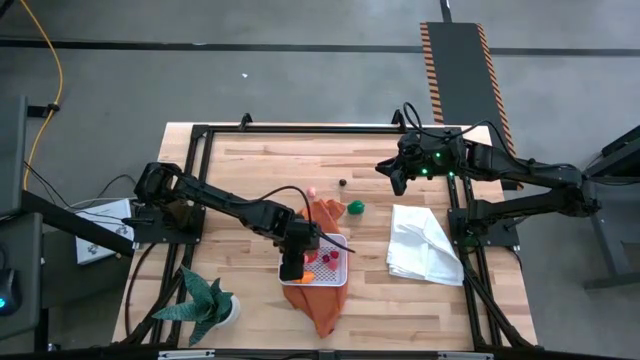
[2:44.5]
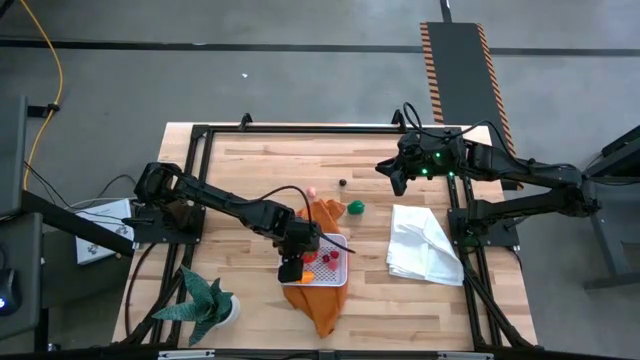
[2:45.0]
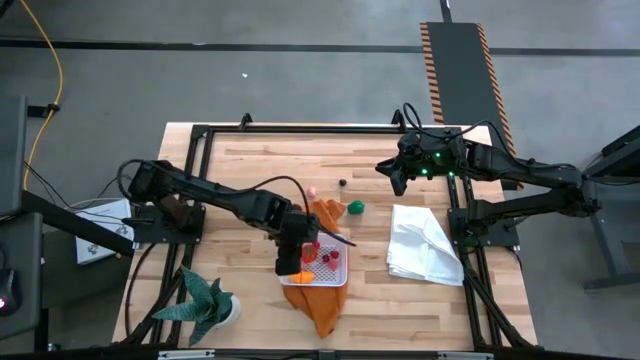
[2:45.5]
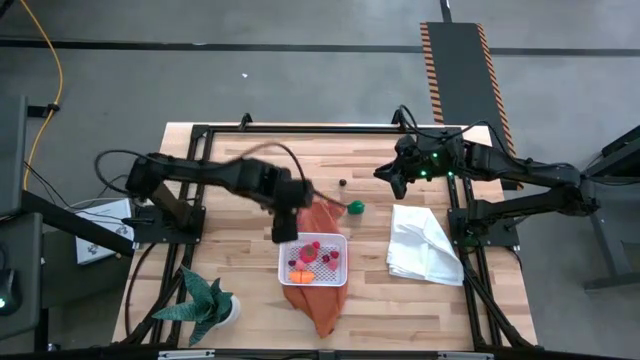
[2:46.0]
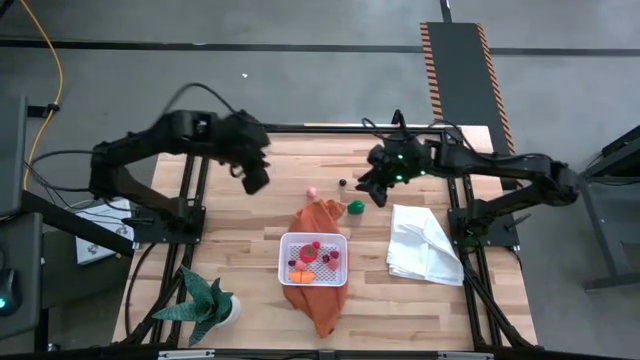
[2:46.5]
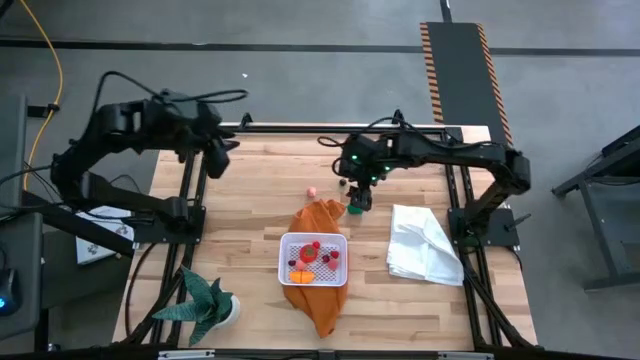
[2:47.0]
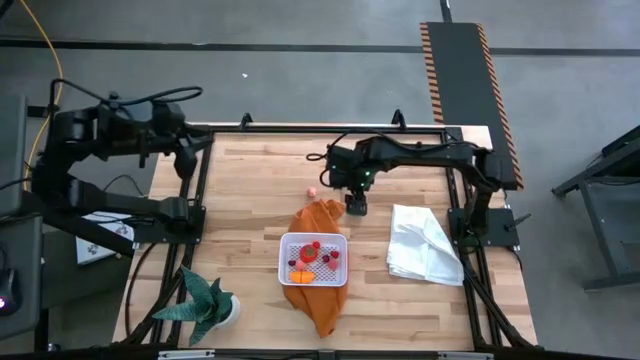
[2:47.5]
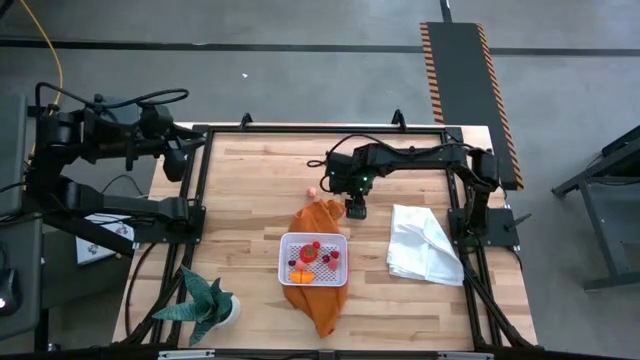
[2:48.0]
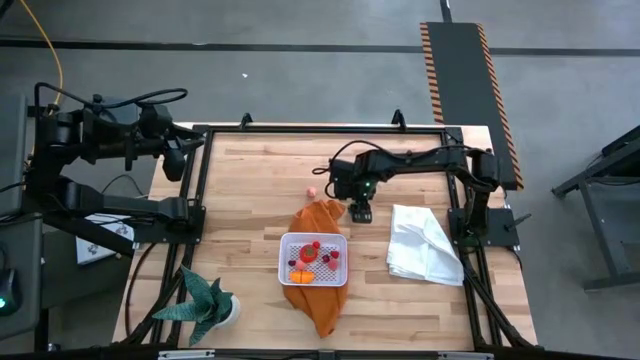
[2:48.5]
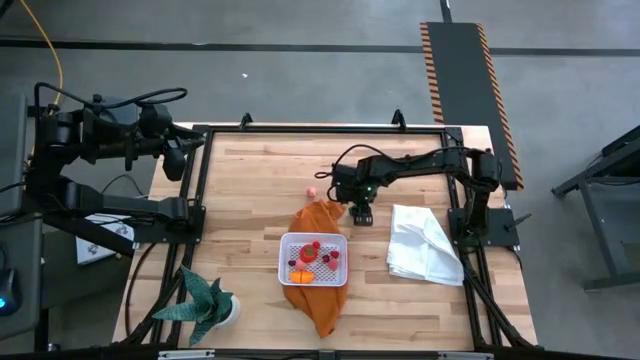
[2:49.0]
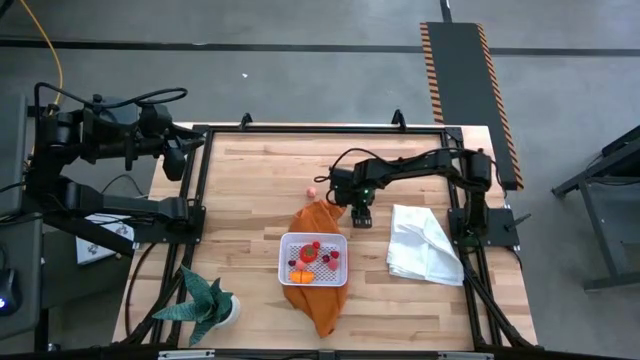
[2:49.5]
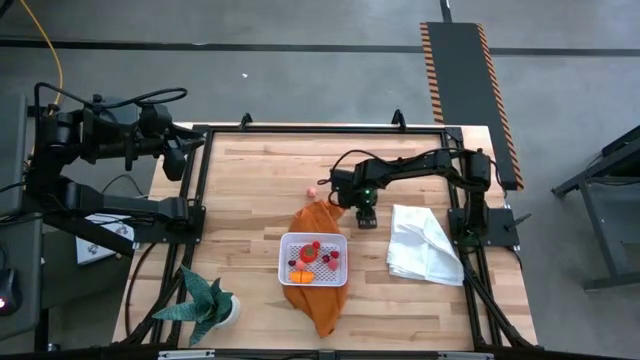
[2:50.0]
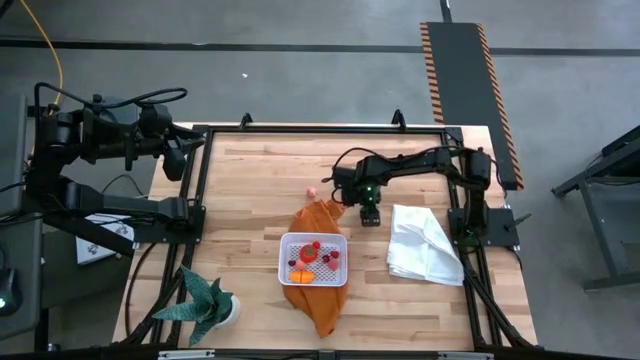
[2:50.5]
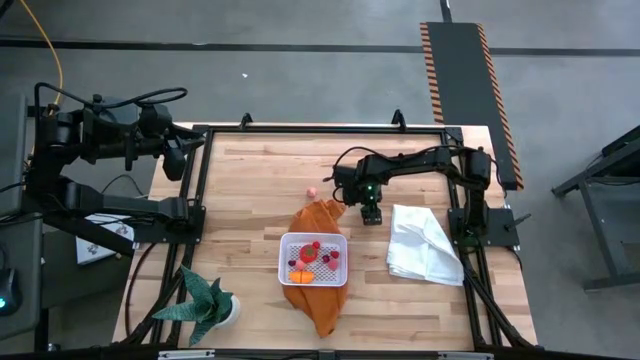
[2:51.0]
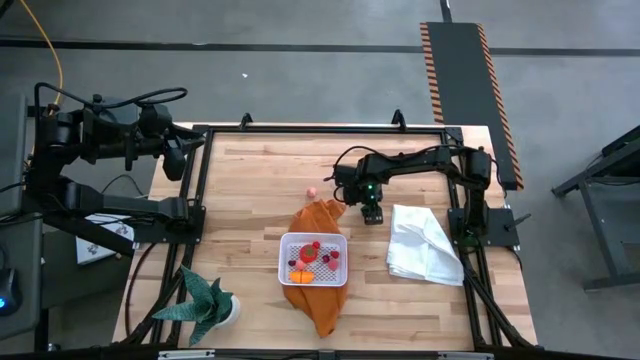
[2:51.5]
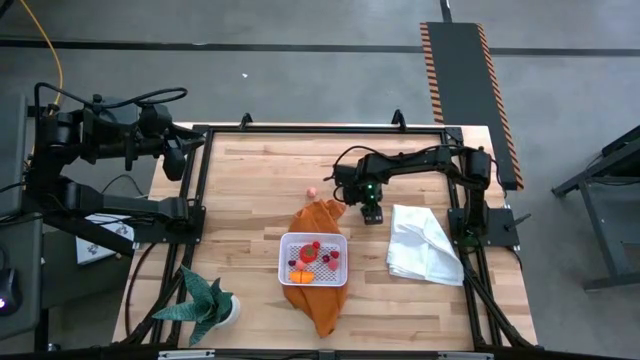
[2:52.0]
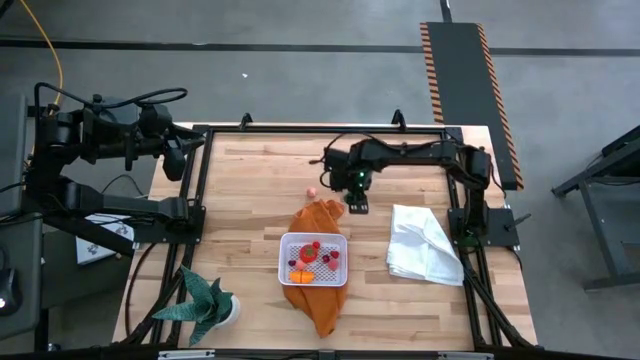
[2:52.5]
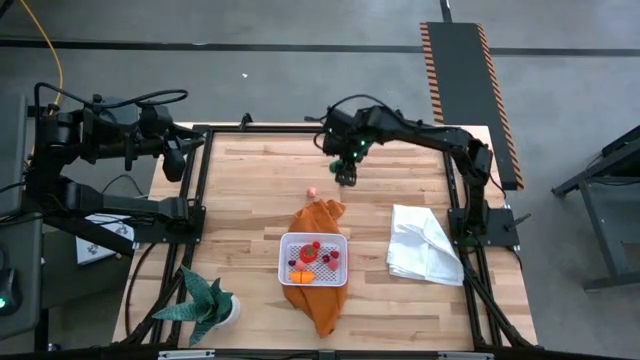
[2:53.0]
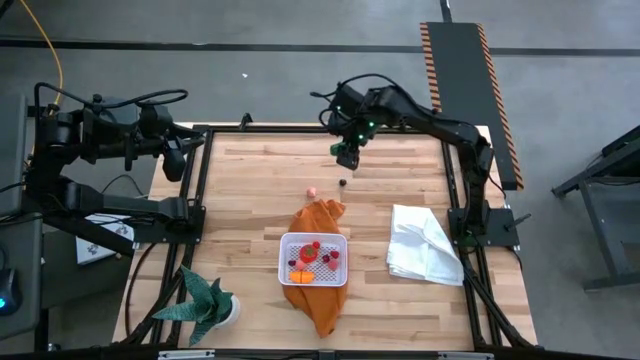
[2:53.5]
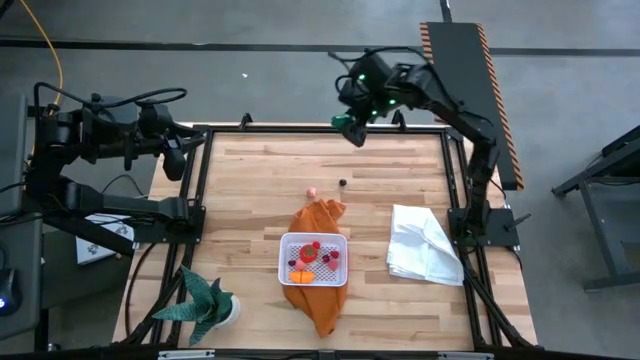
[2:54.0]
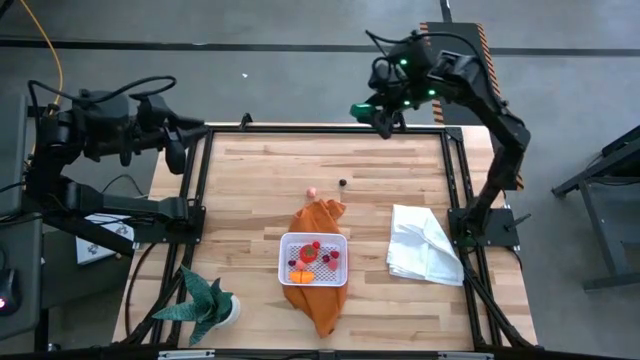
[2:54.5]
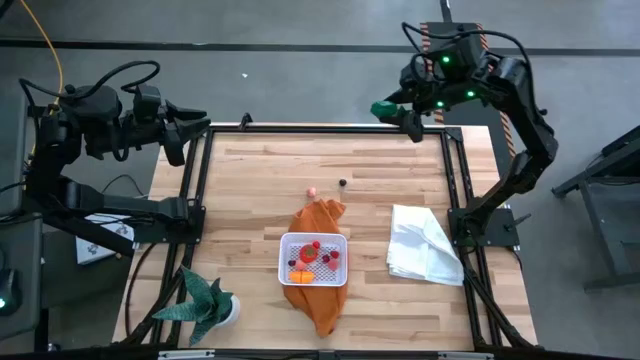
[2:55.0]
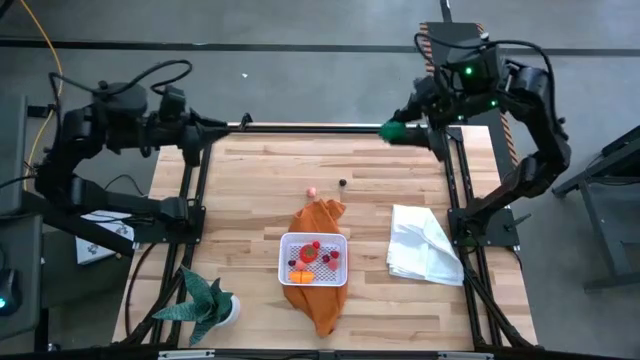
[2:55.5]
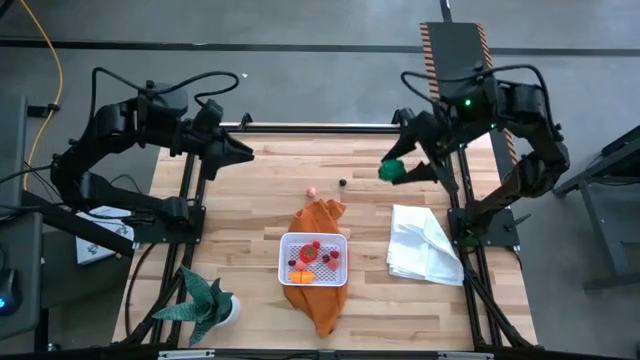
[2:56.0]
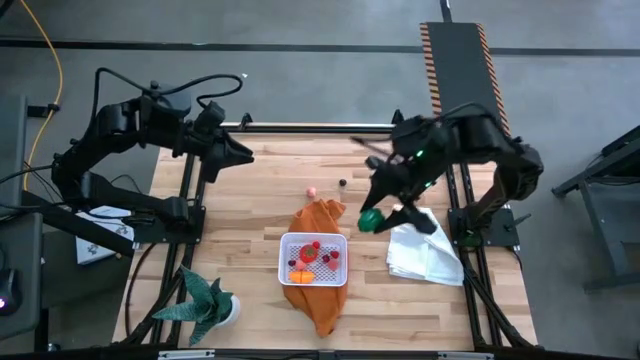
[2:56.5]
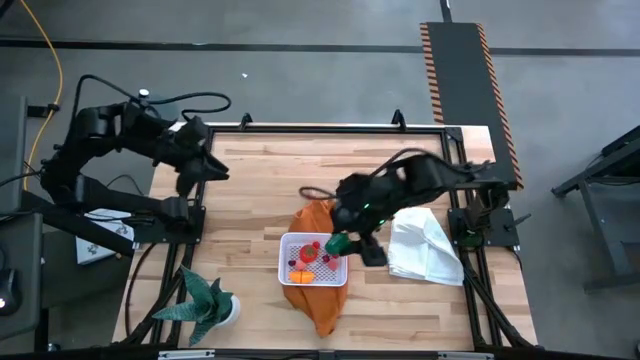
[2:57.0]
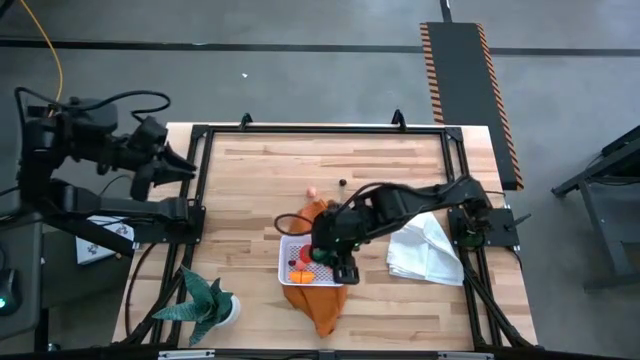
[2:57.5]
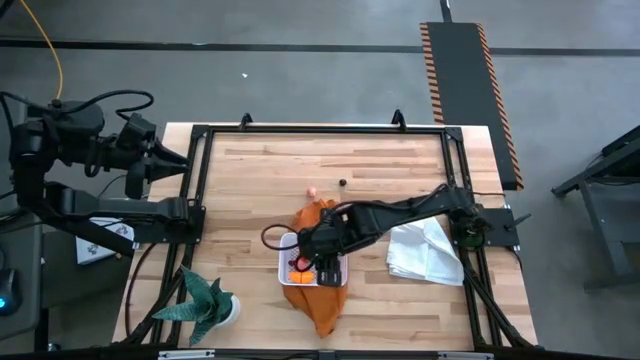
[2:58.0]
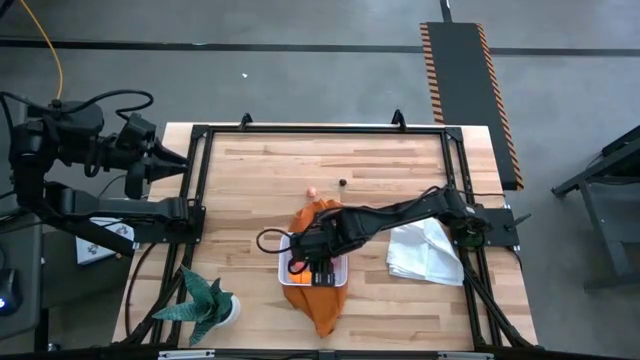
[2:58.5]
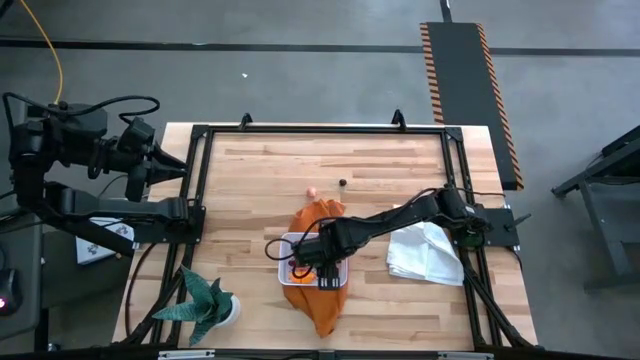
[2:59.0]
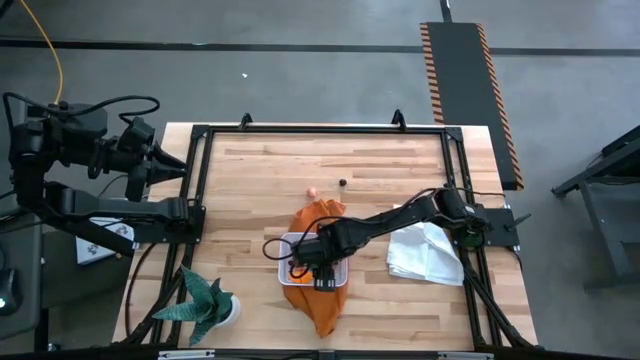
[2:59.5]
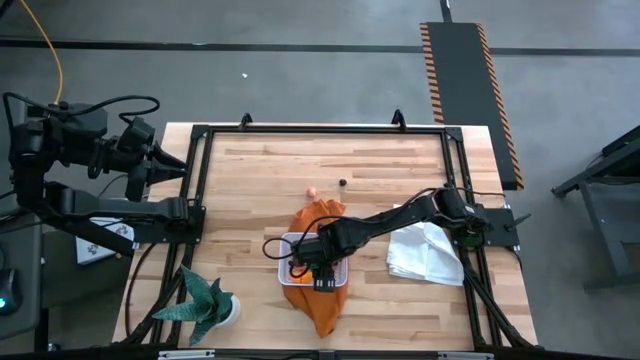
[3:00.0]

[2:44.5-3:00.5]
Task: Pick and placing Produce into tupperware
Put the green bell pepper into the white basket
